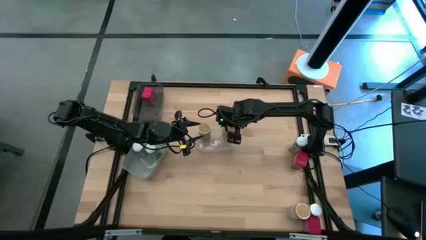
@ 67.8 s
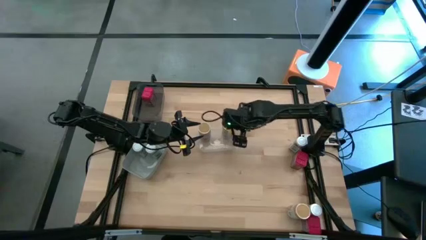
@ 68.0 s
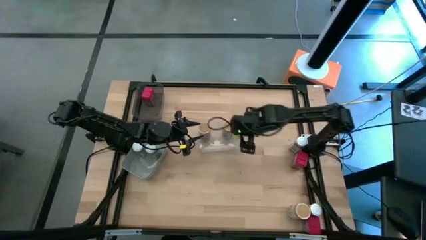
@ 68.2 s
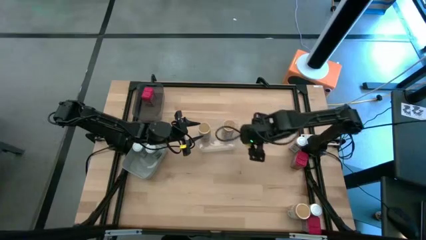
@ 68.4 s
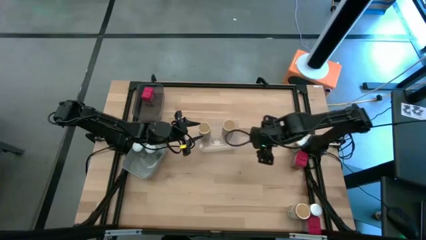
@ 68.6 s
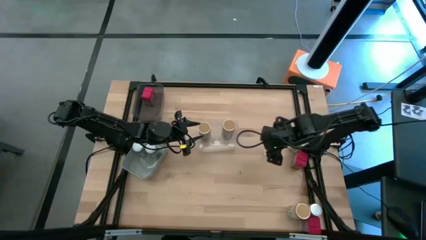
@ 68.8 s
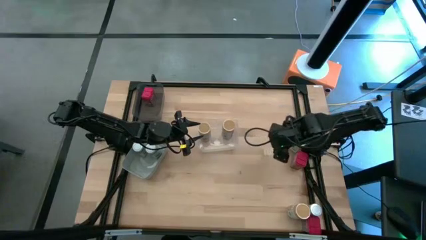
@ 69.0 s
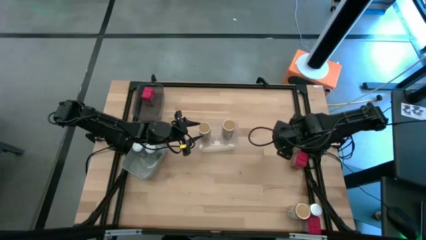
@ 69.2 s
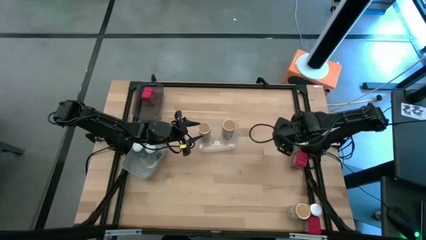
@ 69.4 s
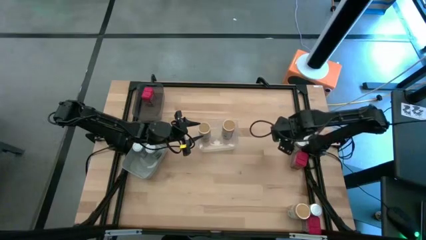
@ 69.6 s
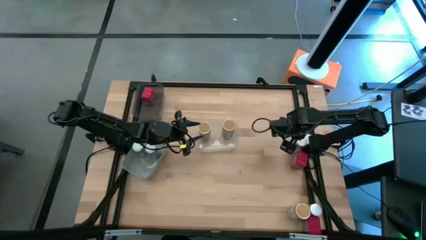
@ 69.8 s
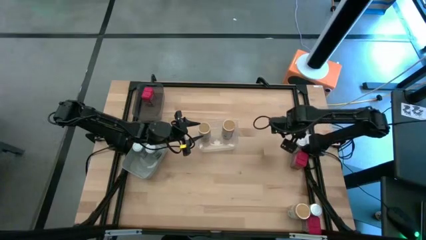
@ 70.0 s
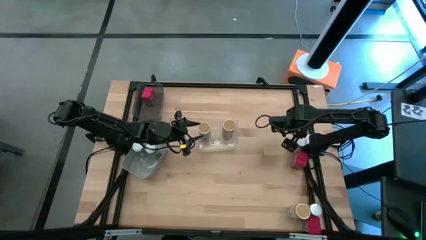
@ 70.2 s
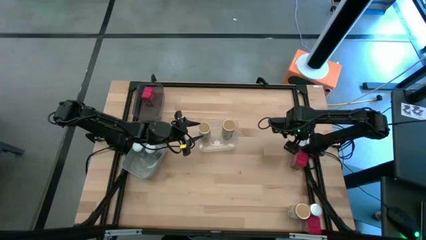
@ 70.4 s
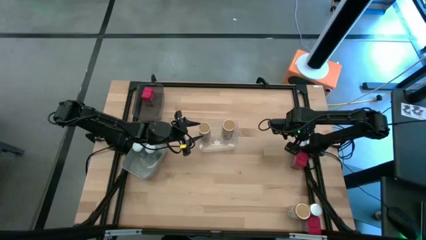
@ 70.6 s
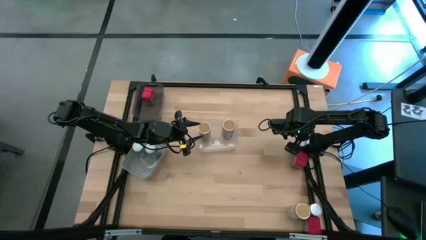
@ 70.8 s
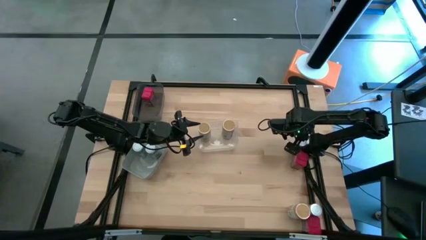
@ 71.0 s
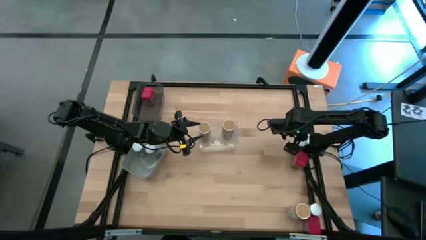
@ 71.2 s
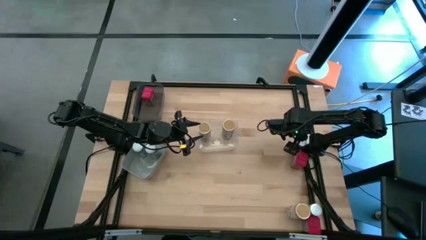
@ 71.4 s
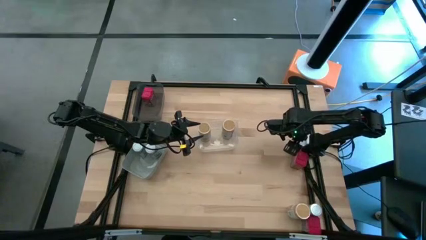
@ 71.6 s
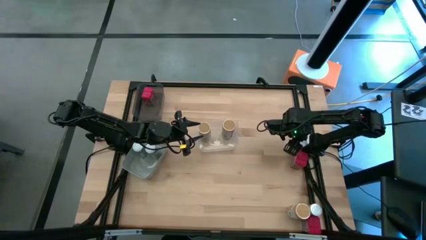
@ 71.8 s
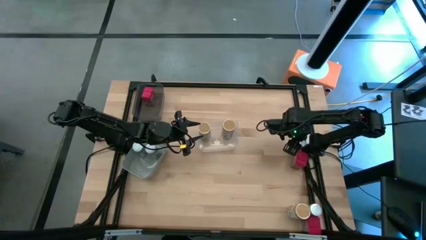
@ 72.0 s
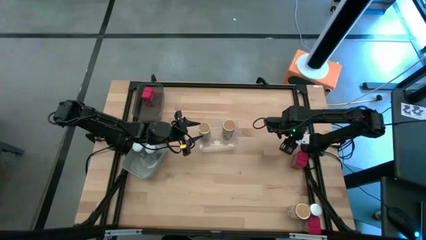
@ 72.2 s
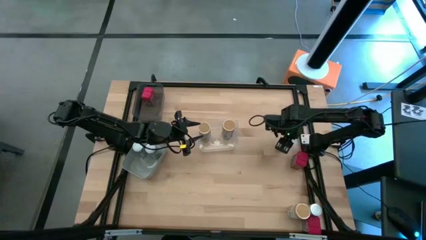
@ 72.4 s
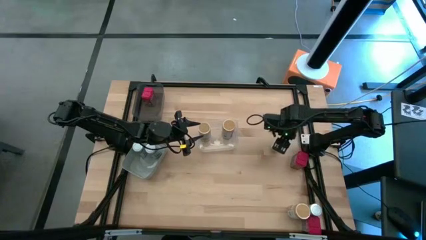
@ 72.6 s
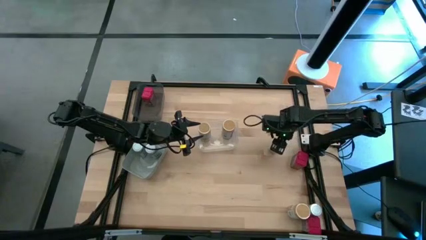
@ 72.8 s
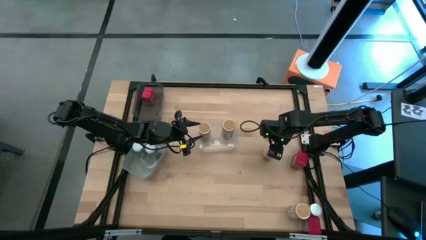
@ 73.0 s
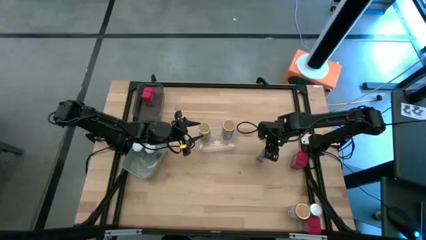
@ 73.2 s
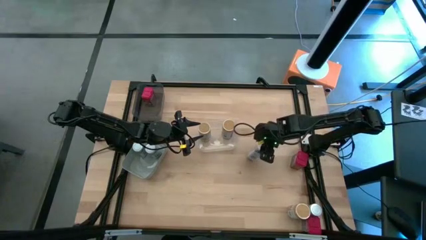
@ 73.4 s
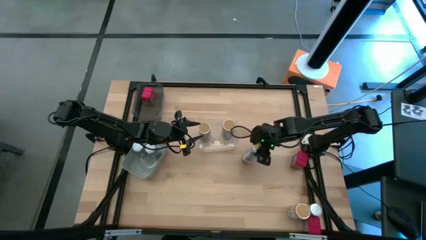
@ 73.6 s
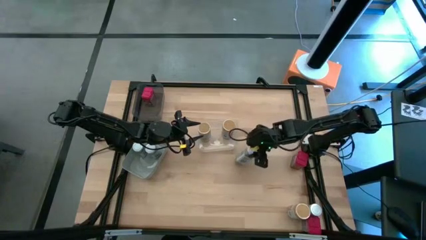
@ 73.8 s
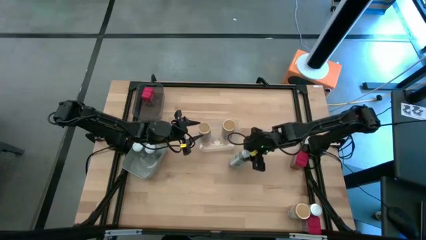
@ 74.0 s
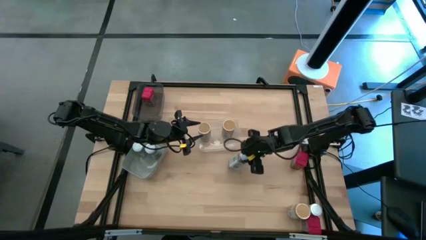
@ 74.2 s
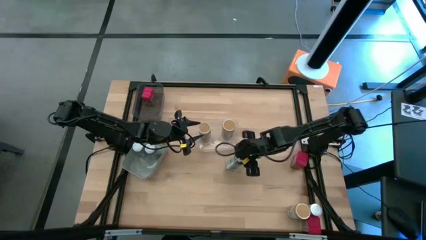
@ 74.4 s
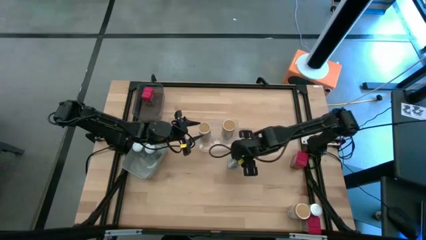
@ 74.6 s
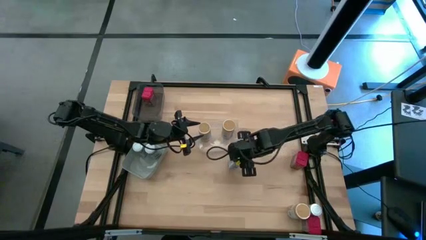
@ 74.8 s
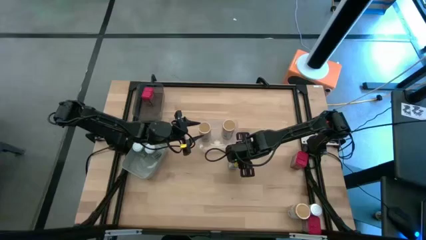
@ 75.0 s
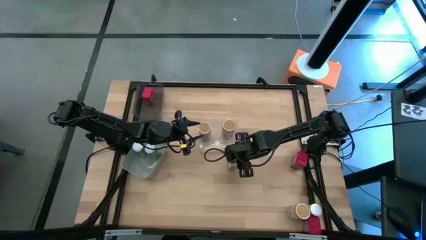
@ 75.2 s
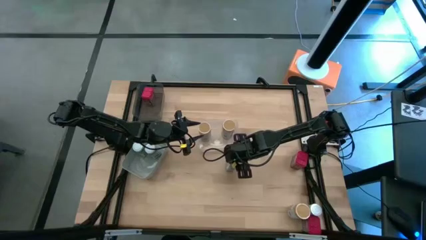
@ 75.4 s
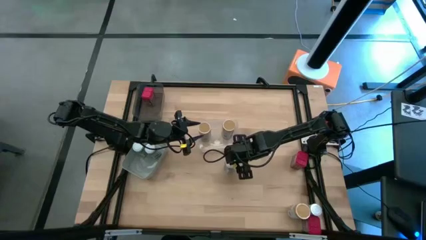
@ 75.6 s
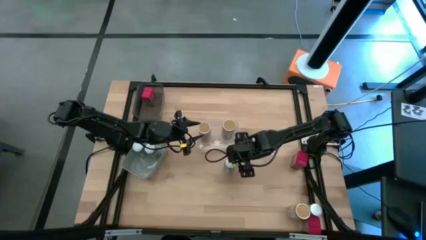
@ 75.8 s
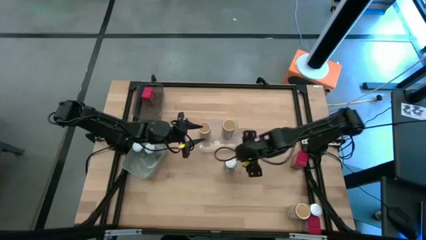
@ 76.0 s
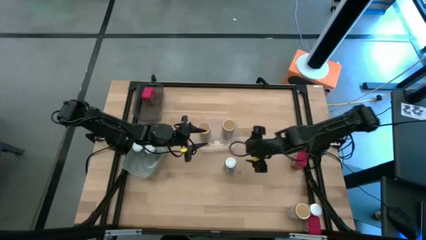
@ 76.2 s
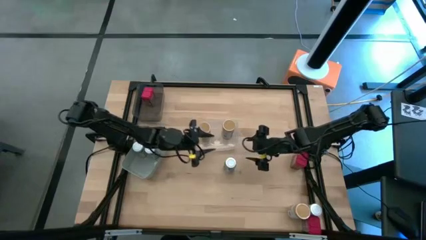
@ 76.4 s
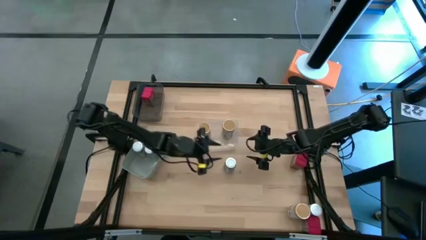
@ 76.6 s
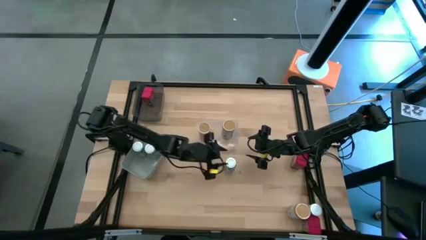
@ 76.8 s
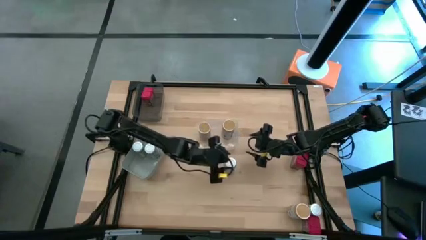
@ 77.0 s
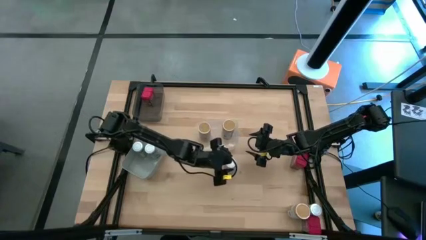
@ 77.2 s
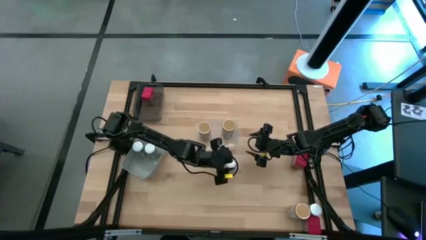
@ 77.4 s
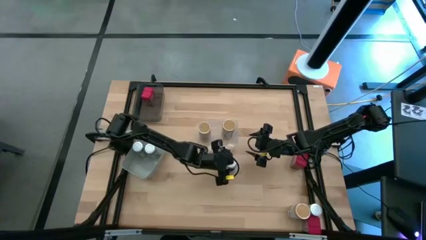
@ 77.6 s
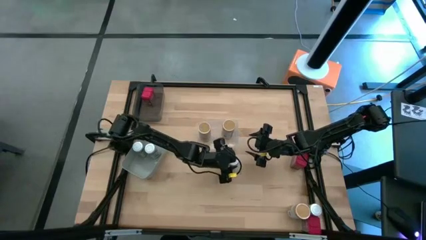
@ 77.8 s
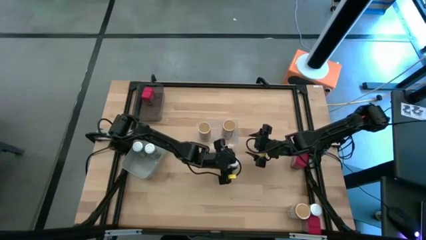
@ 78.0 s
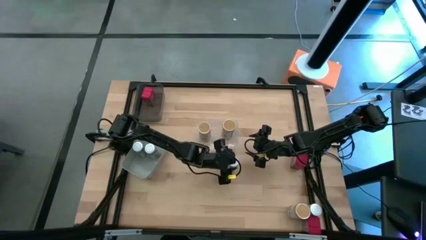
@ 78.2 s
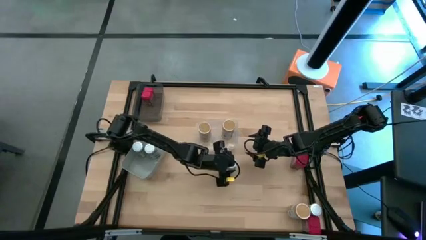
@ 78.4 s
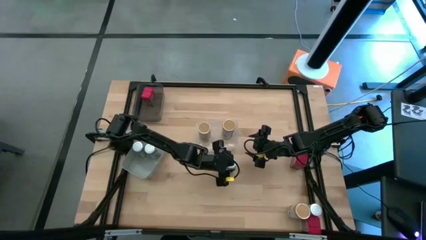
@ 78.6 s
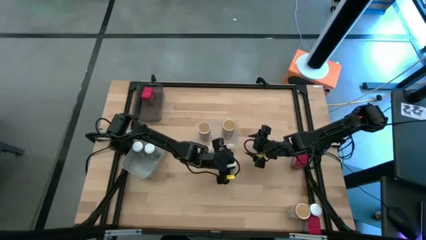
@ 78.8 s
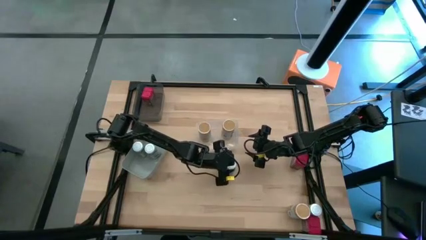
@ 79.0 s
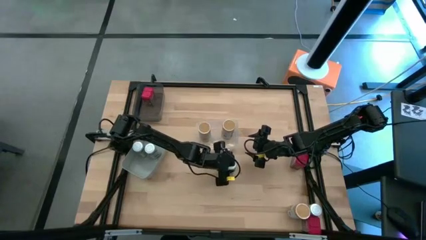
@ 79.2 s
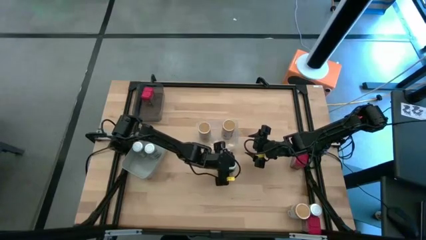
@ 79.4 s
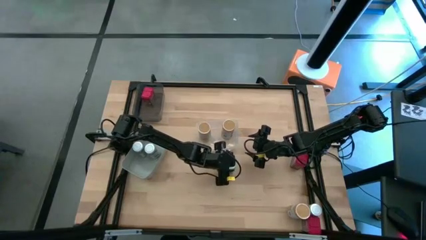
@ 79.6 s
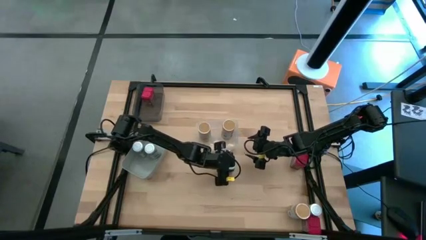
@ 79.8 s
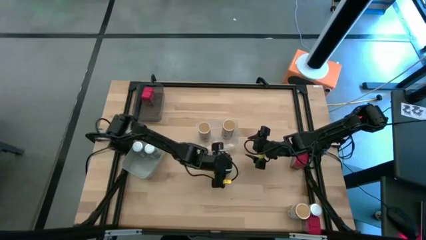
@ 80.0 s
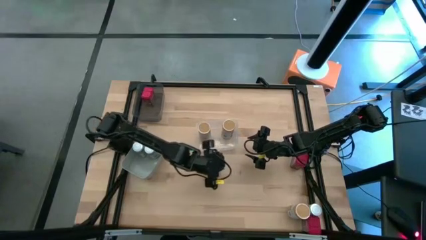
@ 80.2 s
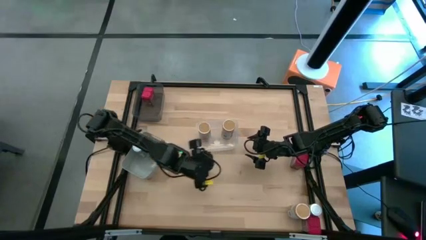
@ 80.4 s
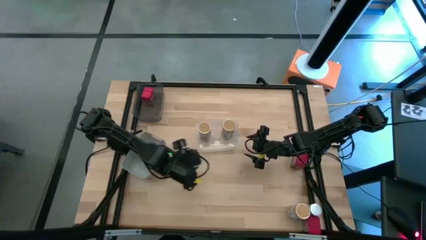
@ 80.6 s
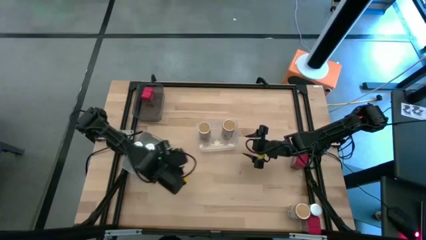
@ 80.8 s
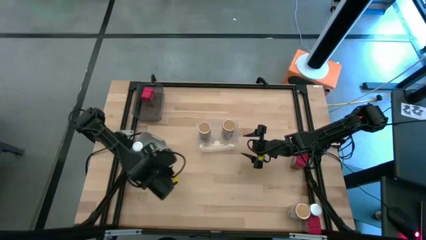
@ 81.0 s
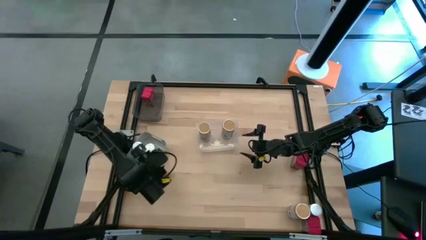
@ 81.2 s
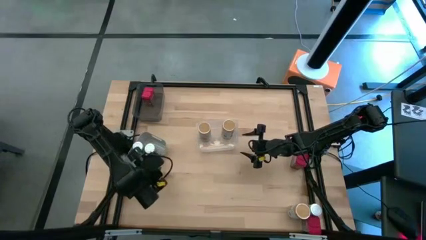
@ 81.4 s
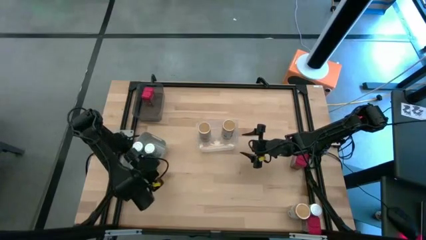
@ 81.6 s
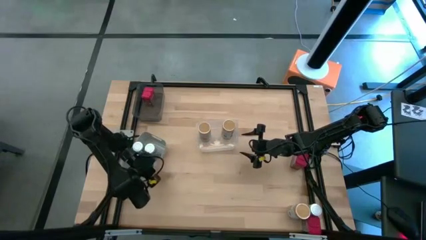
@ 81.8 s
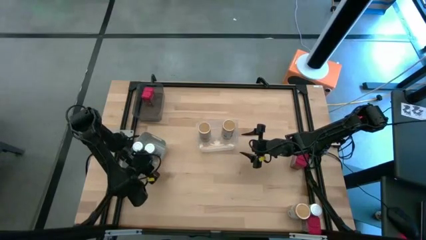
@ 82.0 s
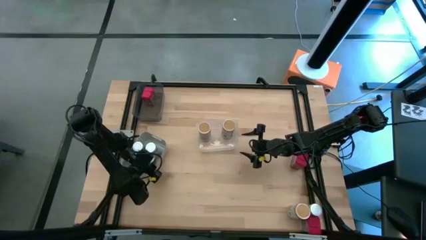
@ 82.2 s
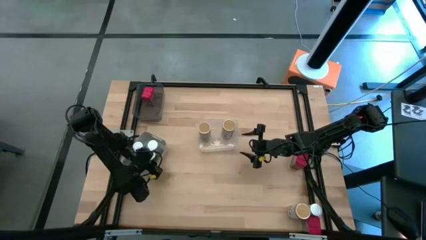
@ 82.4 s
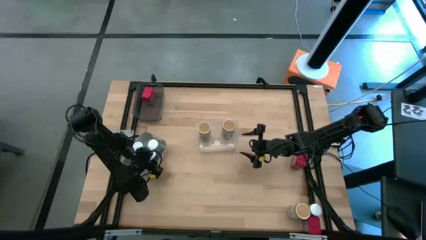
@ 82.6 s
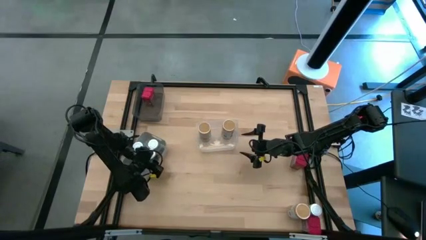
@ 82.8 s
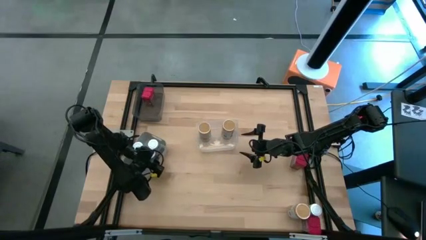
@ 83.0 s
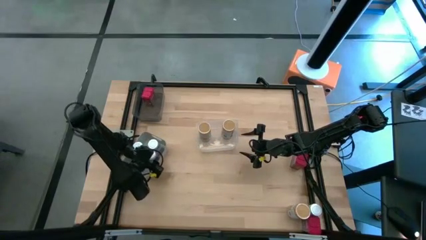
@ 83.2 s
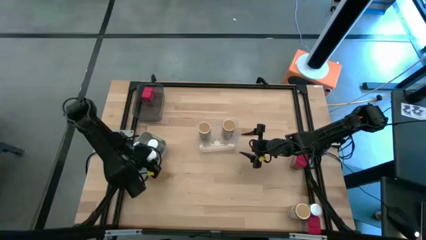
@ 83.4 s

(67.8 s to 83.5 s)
Task: Sort spices by type
Put the top white seasoning bottle into the gray bin
